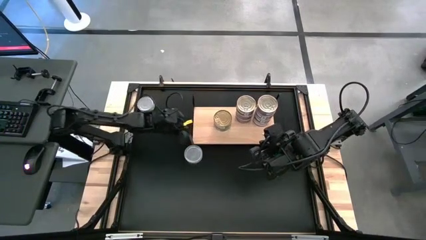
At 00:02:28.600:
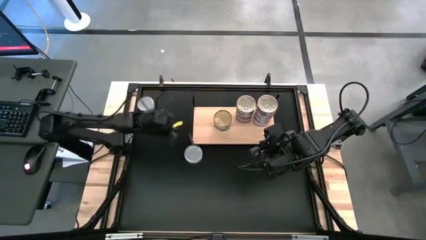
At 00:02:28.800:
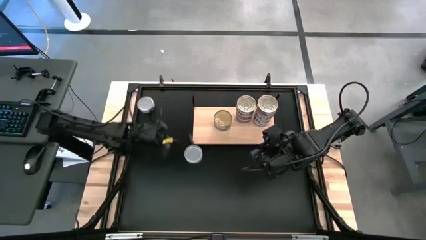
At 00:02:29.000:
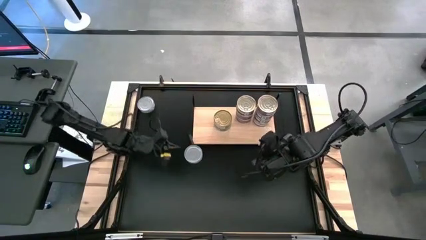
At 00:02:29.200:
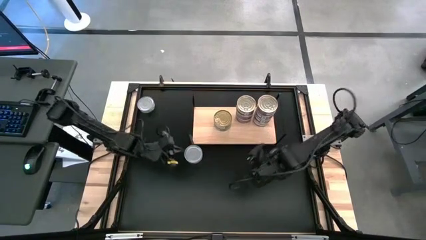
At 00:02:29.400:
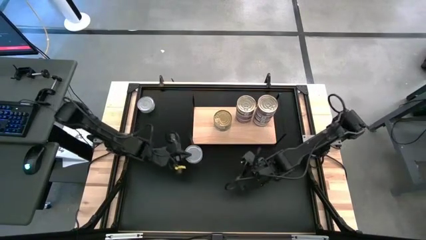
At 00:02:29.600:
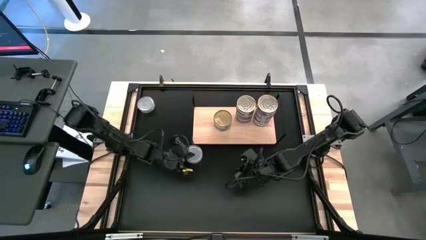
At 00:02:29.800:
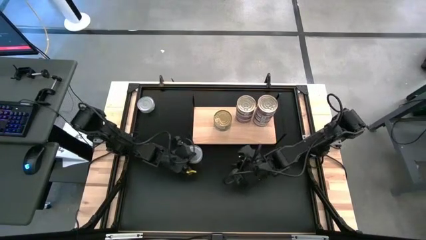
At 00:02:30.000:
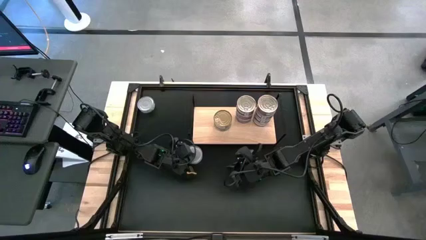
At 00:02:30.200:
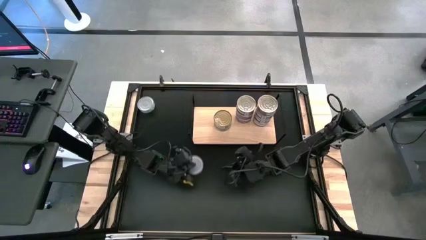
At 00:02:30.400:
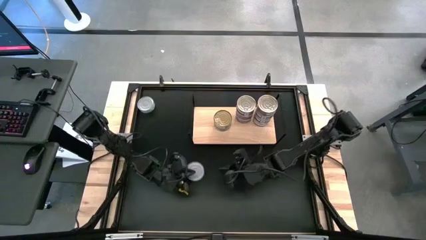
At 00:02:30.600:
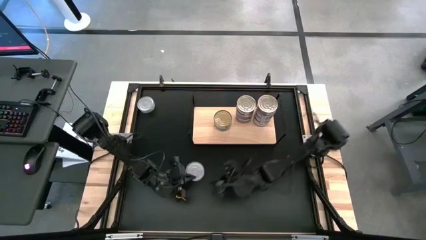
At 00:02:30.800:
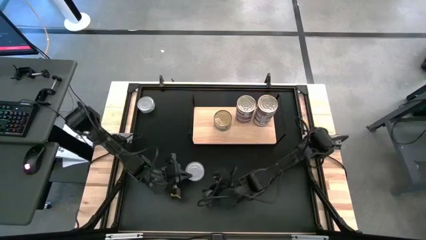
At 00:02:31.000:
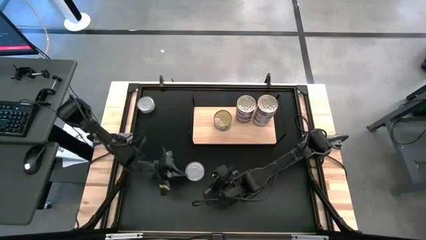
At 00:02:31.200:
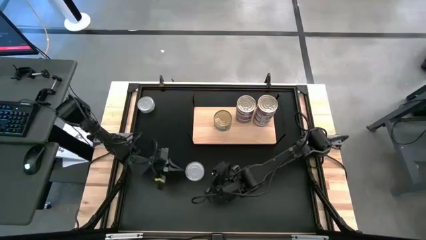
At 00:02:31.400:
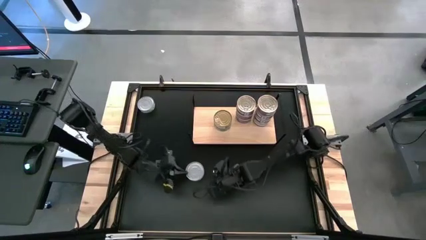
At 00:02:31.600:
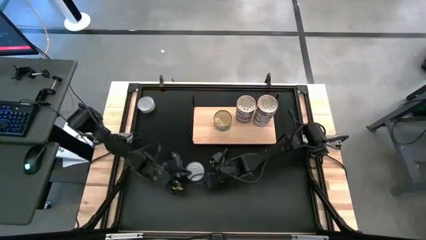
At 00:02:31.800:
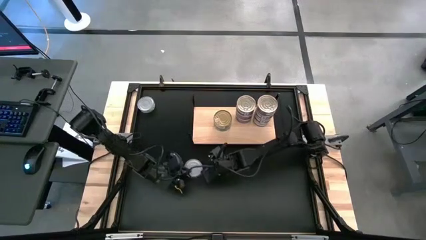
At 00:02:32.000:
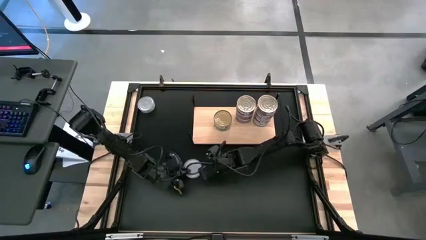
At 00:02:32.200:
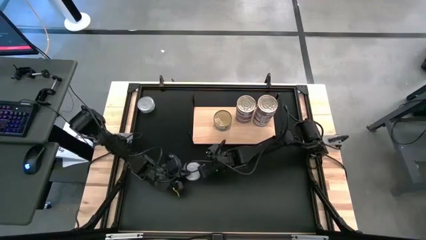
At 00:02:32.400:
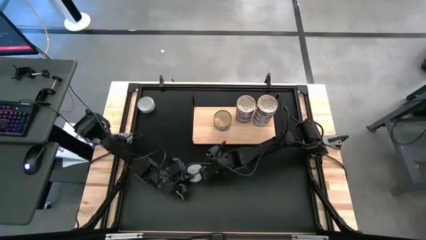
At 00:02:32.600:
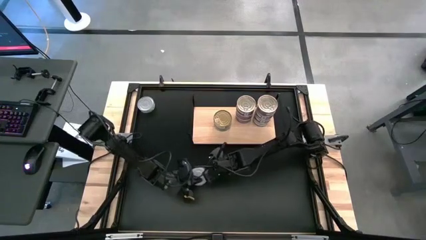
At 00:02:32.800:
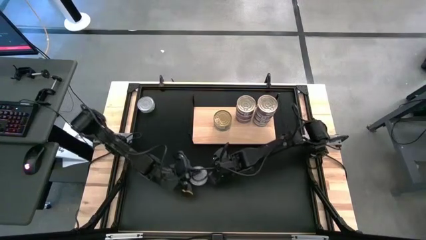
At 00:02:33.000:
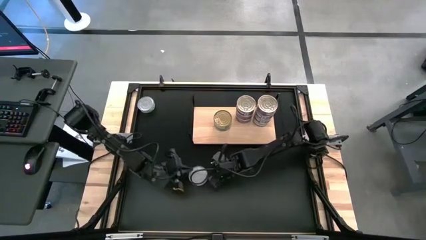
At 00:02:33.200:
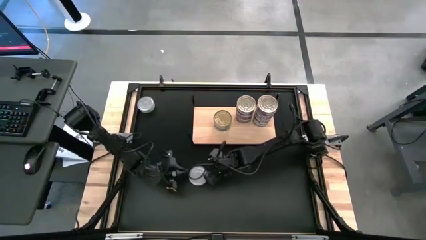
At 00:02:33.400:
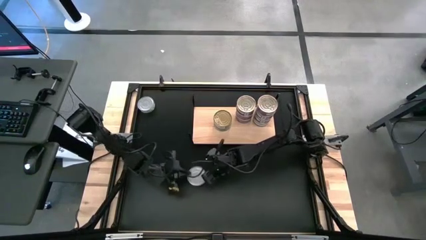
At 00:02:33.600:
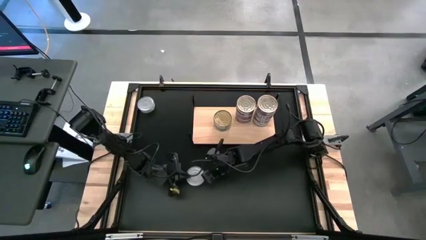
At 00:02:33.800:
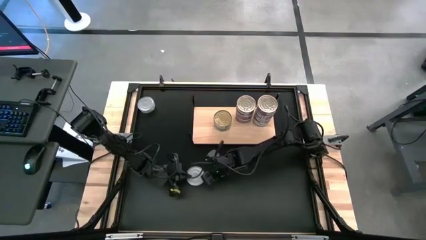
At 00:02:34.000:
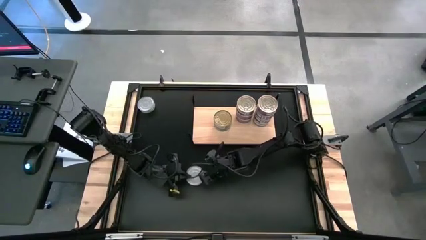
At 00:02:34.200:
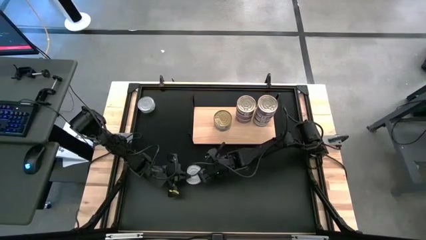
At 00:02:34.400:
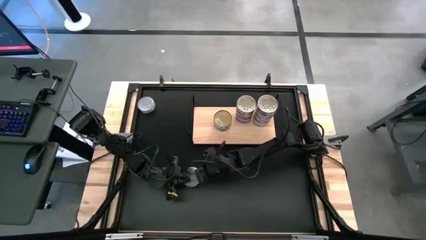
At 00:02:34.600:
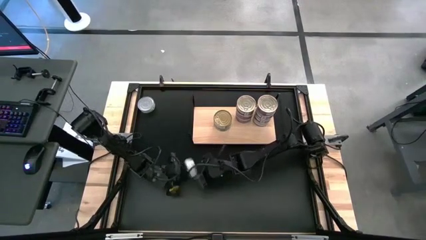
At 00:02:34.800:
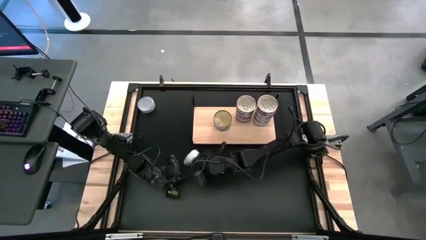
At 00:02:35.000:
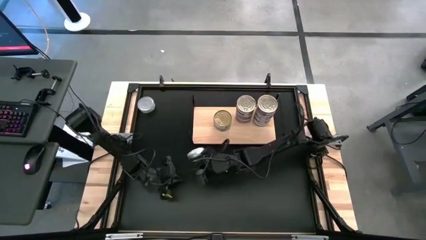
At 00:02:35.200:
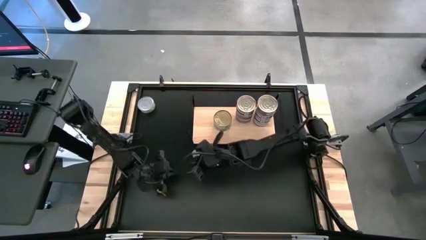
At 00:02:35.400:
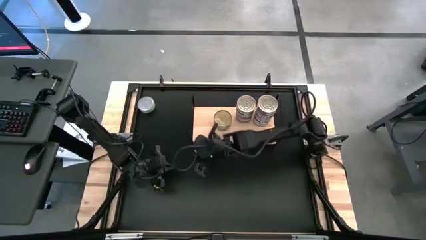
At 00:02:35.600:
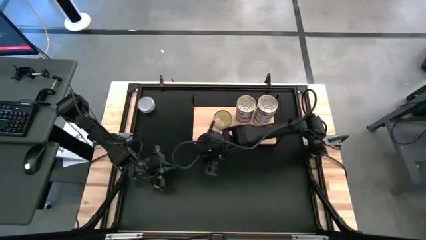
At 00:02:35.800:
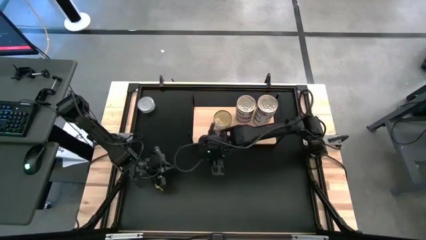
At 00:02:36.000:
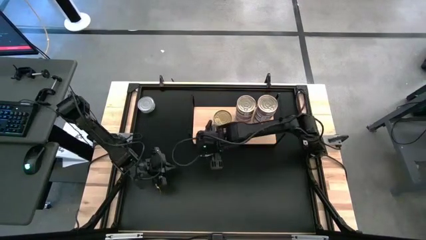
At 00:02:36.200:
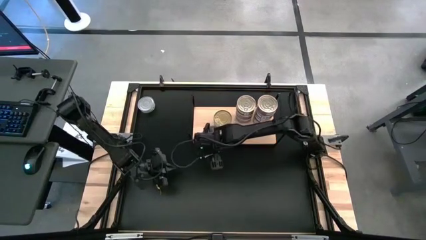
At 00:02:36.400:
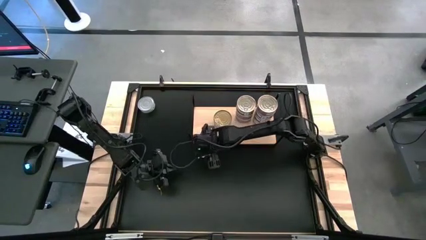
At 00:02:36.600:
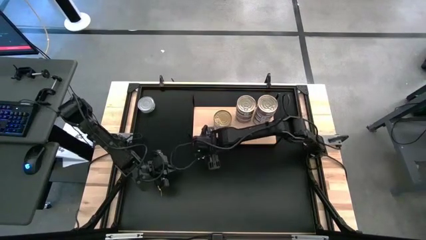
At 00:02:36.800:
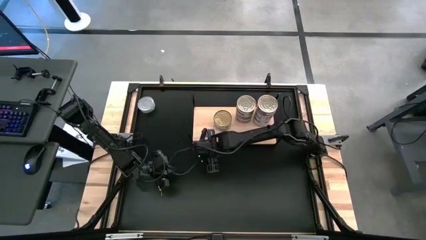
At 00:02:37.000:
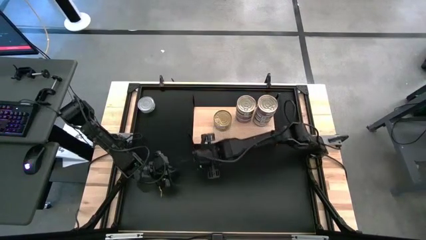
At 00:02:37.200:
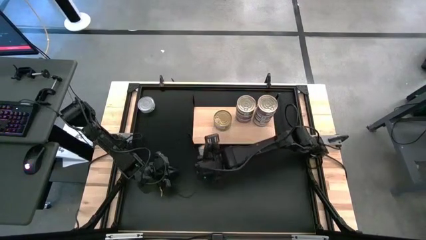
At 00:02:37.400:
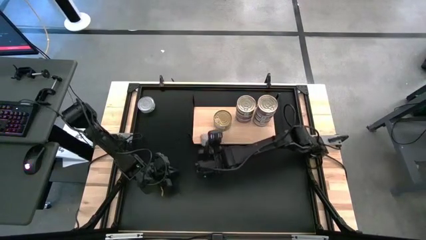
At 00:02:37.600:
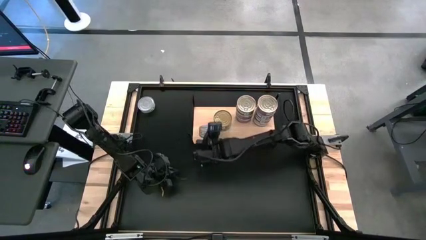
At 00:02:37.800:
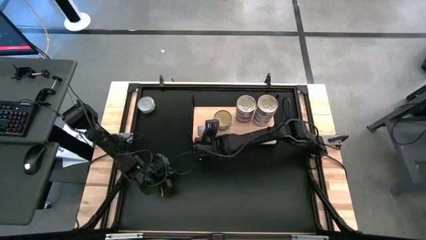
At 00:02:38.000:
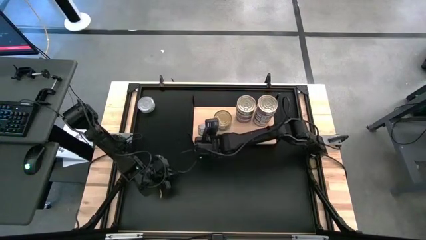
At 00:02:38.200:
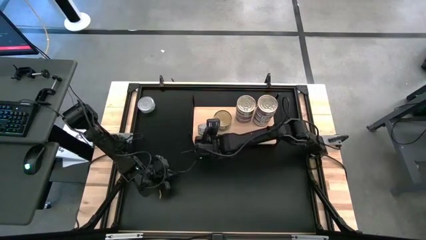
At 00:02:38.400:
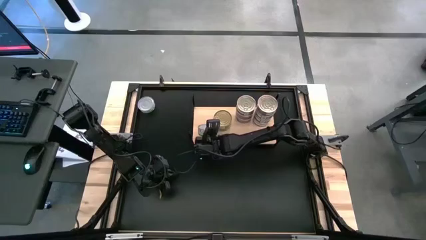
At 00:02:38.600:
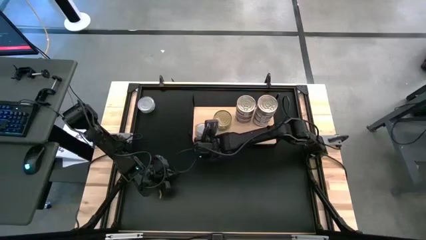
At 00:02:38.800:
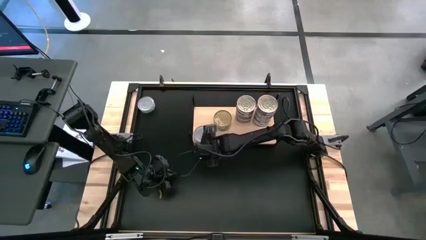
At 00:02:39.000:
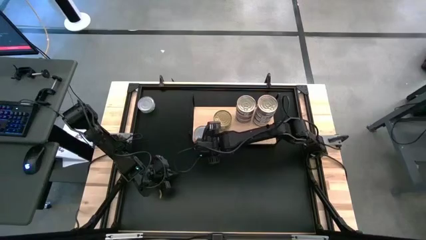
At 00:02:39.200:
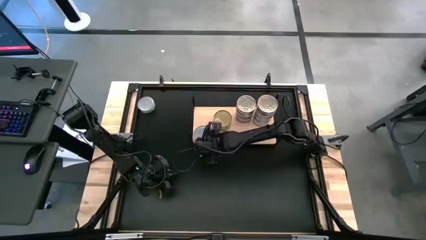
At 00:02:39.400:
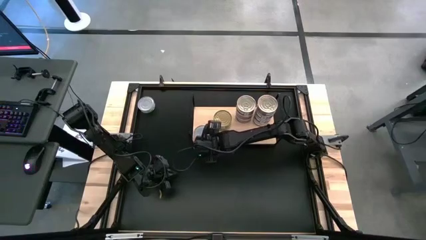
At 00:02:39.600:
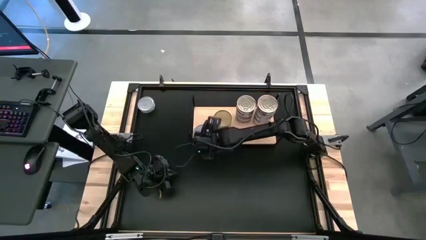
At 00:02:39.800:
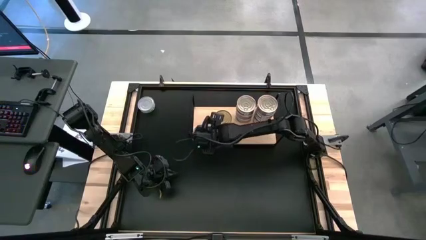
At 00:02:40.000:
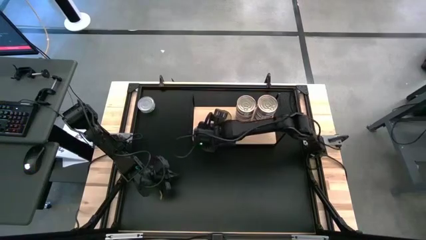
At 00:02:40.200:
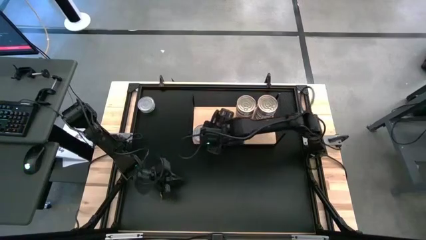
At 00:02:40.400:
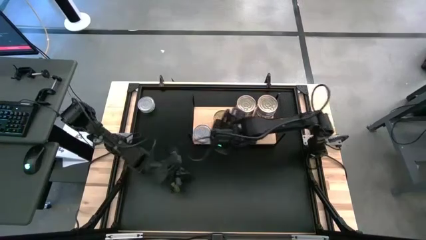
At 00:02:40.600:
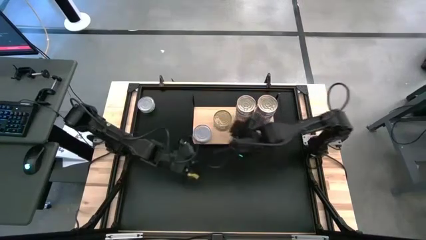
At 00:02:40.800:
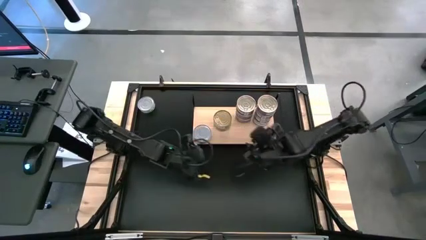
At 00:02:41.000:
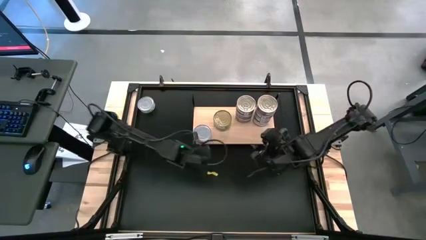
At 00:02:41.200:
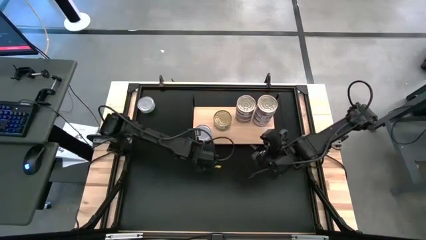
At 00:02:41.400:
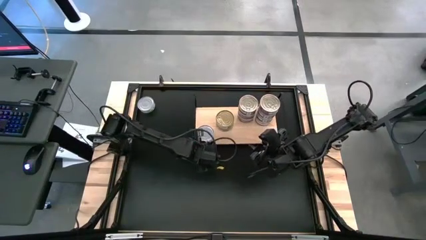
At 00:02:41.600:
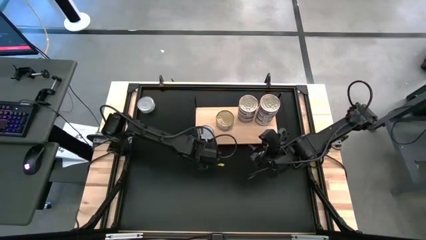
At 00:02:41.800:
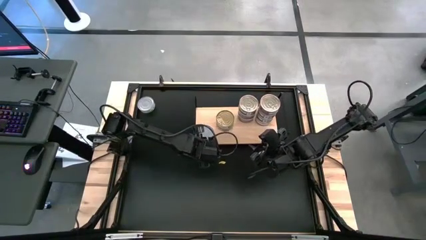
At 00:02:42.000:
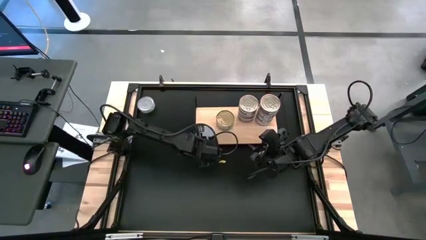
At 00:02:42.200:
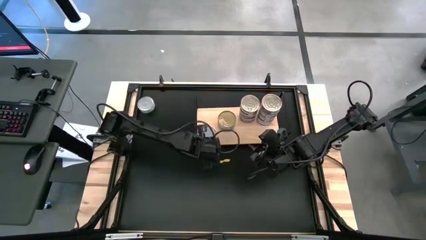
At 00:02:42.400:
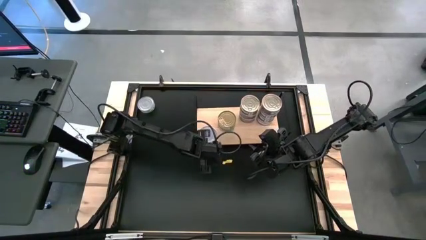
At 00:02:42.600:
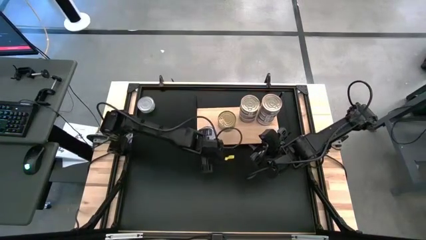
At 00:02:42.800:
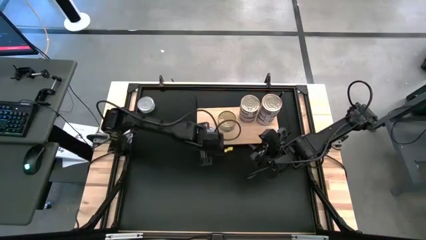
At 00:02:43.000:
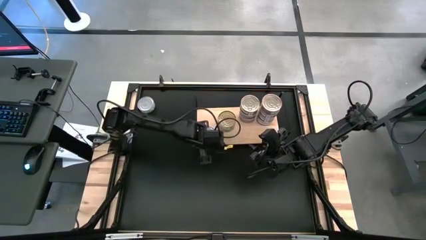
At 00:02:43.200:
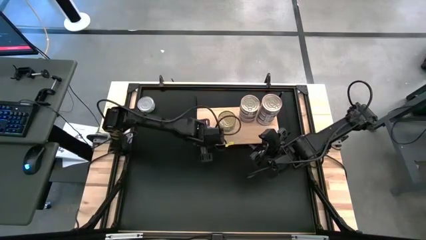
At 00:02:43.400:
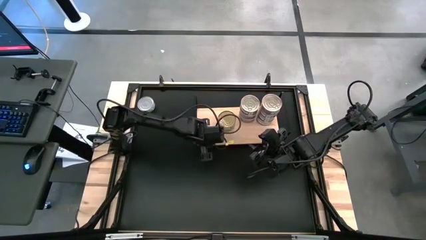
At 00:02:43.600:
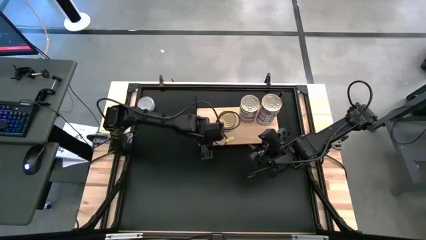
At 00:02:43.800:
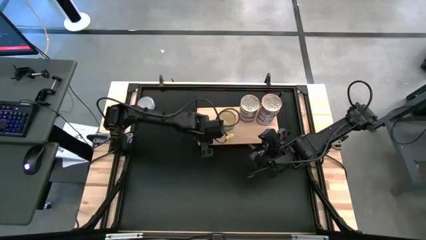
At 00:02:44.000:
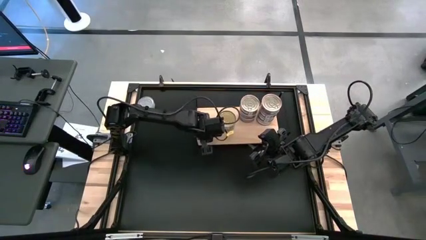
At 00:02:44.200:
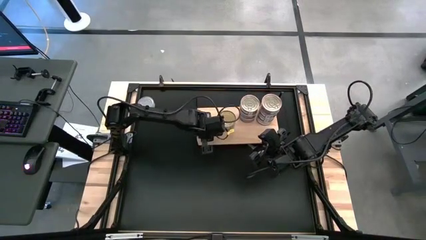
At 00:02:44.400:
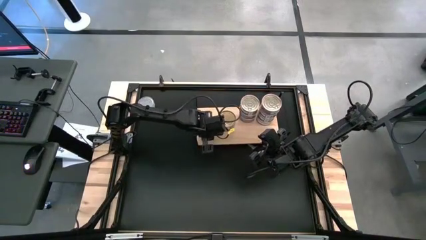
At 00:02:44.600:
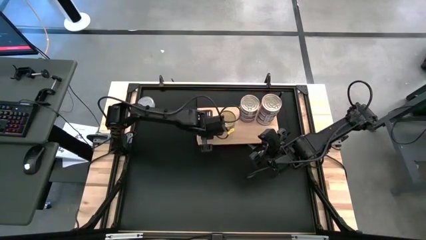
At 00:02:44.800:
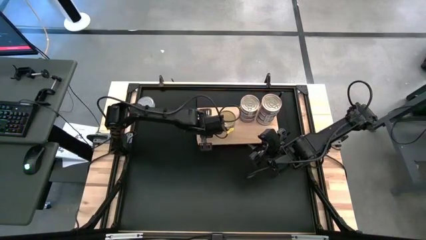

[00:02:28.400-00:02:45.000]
Task: Stack canned seafood by type on shelf
Put the green tuna can on the shelf
